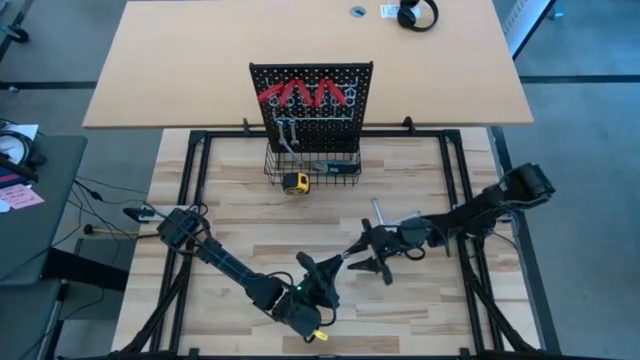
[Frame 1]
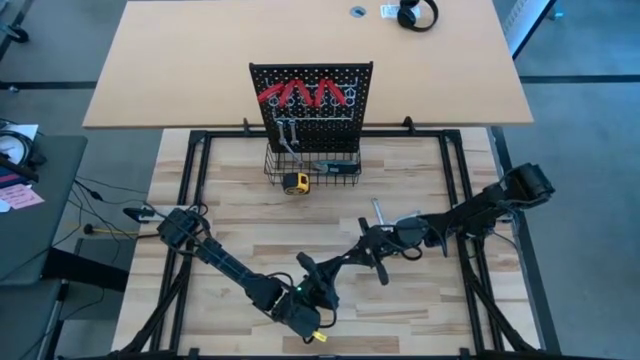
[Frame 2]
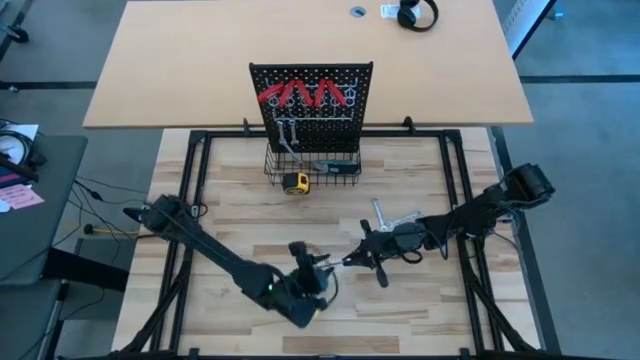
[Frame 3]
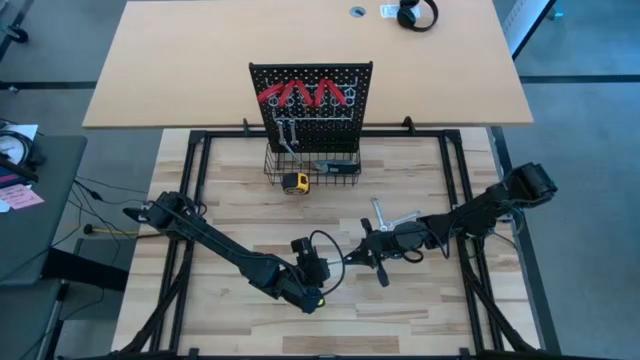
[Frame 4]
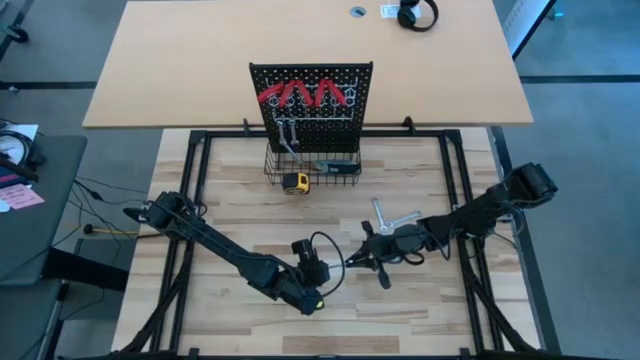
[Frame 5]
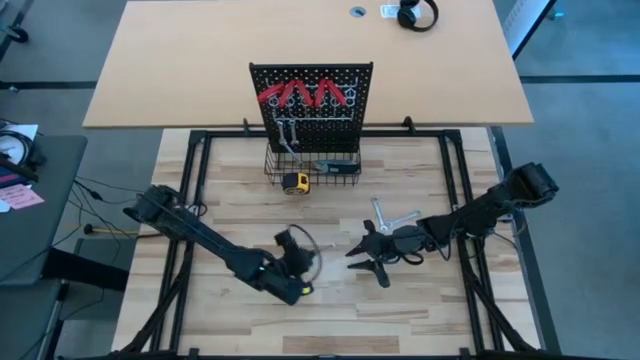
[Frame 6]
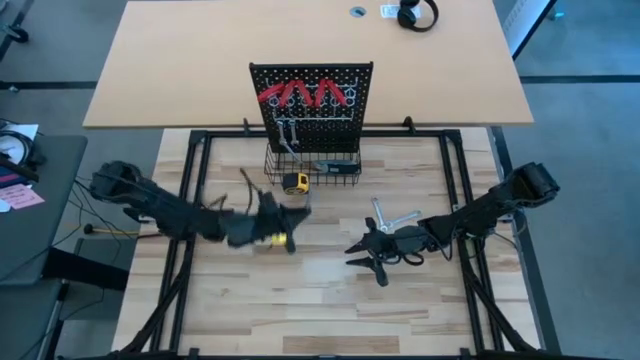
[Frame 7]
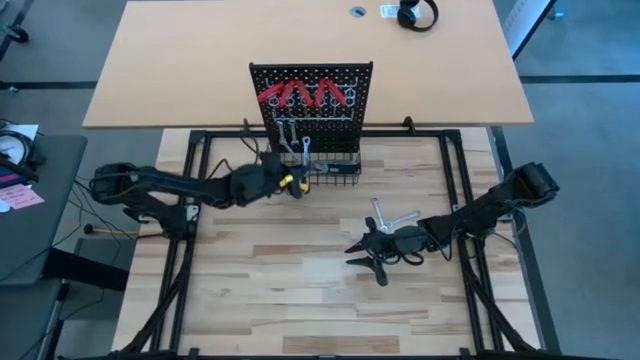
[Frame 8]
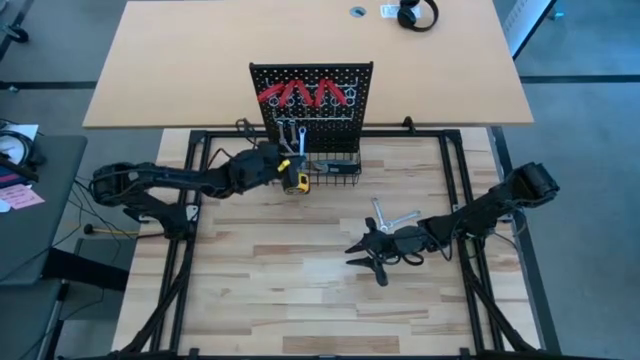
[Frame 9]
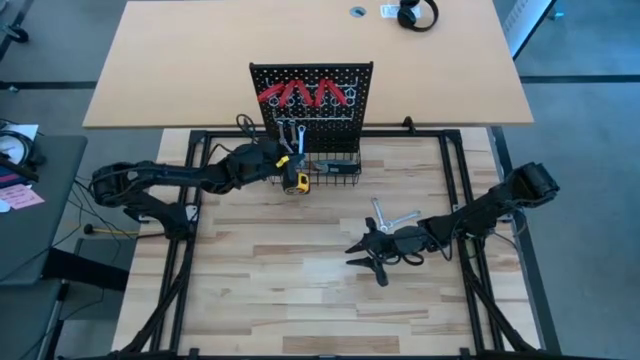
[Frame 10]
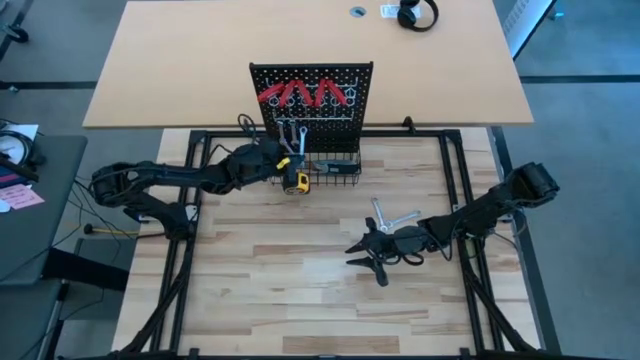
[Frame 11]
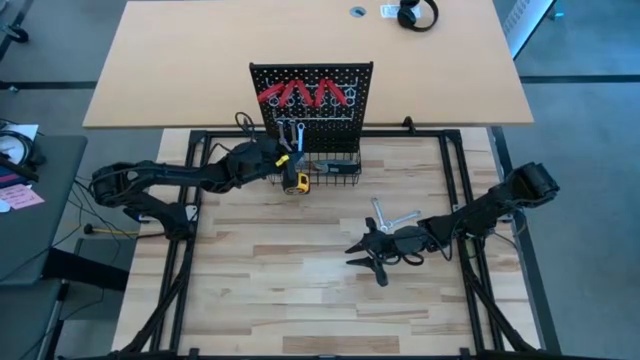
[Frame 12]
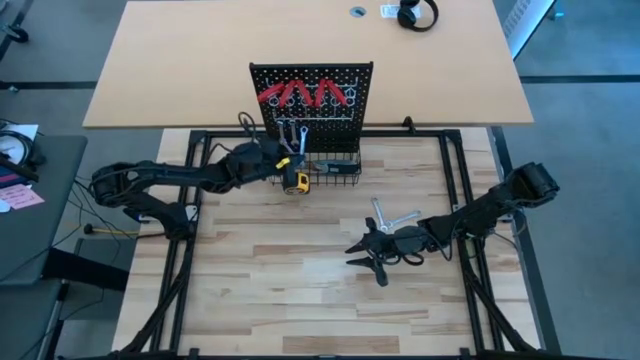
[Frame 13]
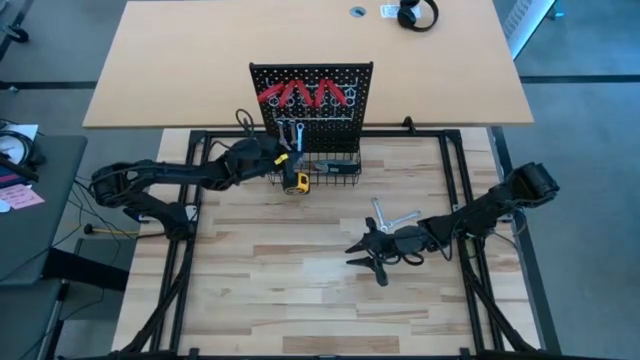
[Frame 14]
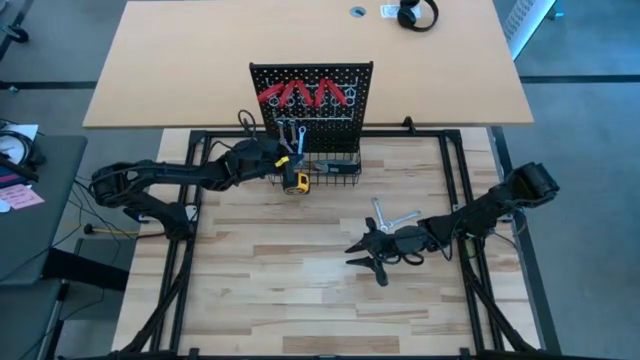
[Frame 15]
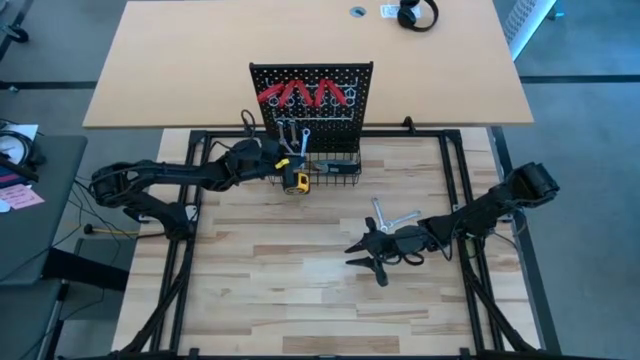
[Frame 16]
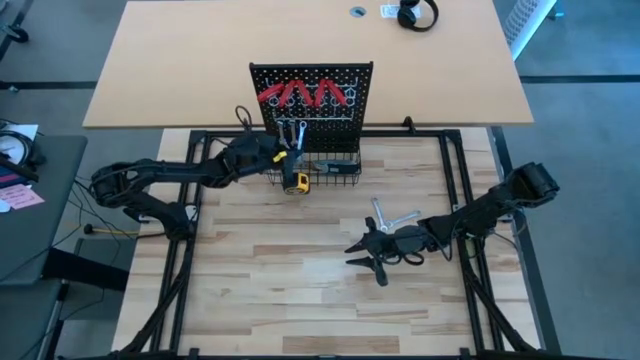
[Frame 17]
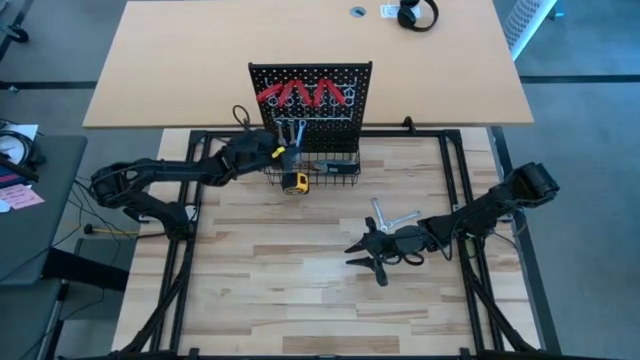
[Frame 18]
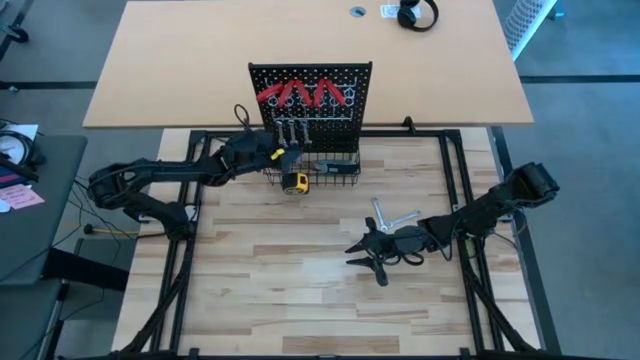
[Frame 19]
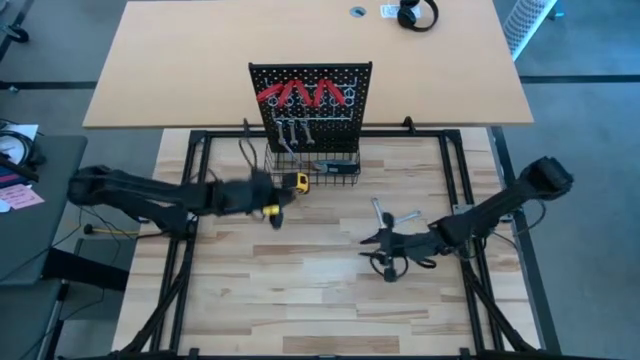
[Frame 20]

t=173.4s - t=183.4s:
Task: Hang tools onto peg board
Hang the wrench into the pegboard
